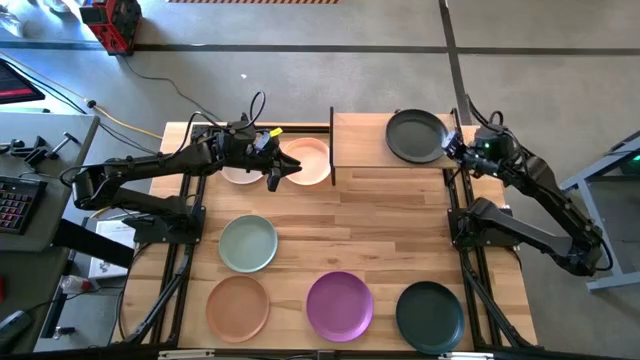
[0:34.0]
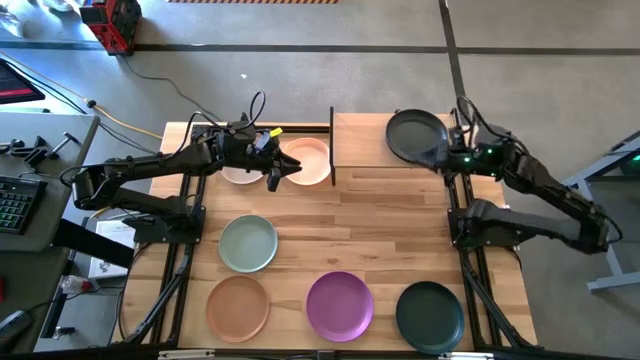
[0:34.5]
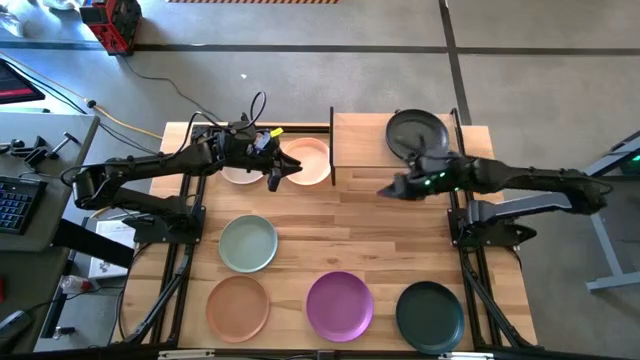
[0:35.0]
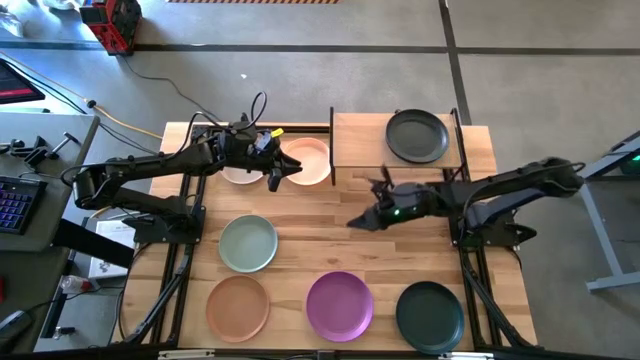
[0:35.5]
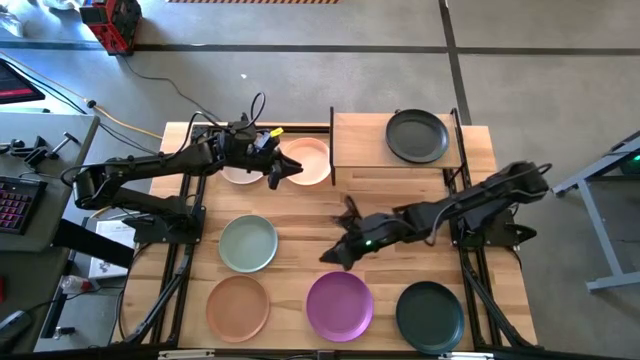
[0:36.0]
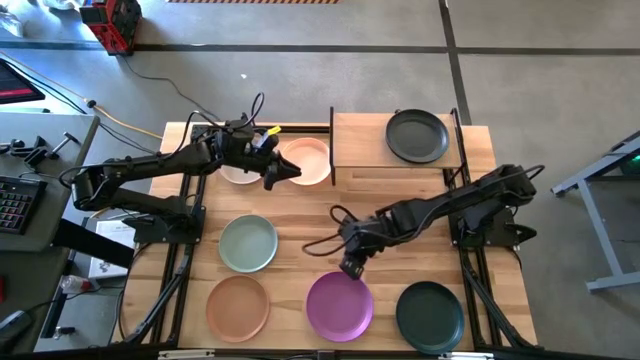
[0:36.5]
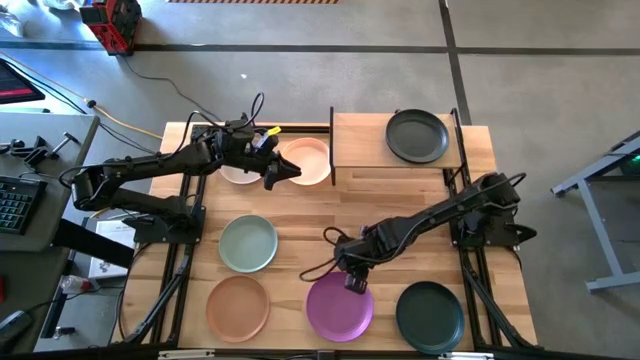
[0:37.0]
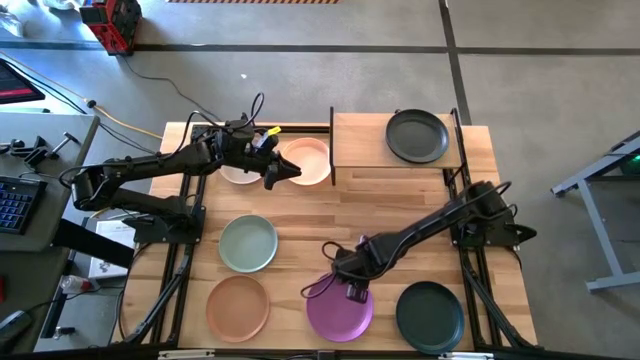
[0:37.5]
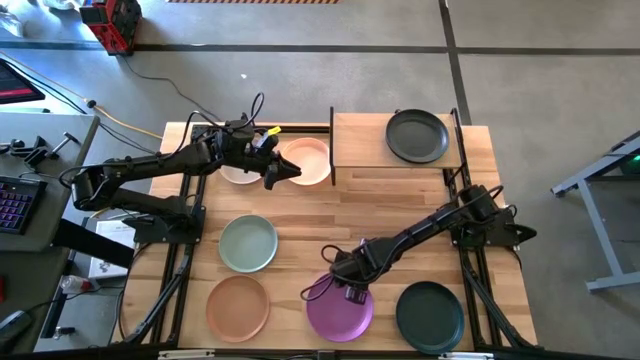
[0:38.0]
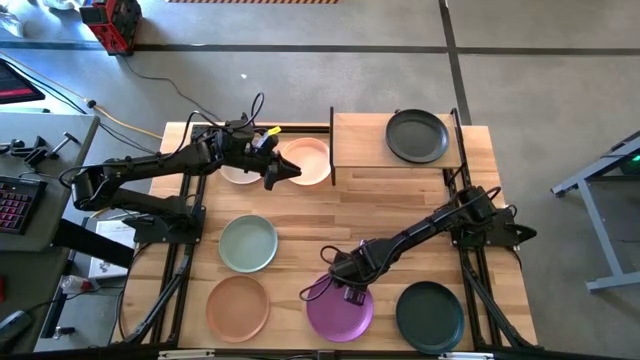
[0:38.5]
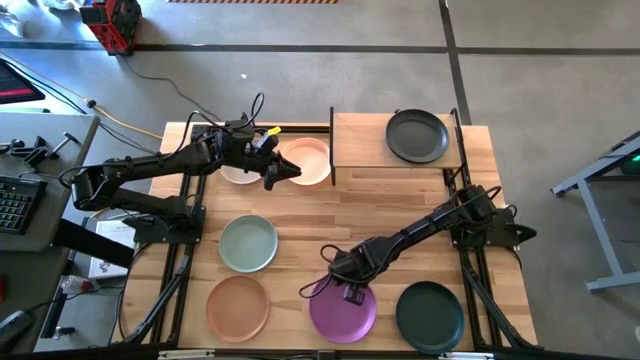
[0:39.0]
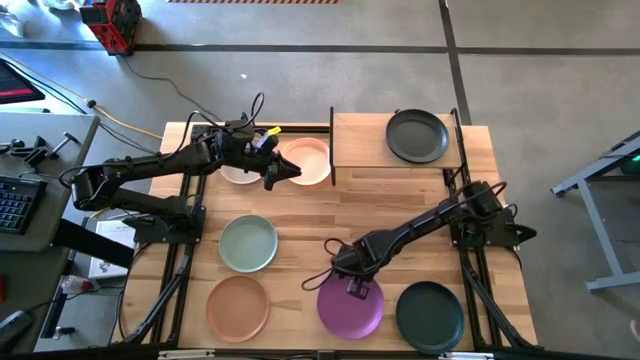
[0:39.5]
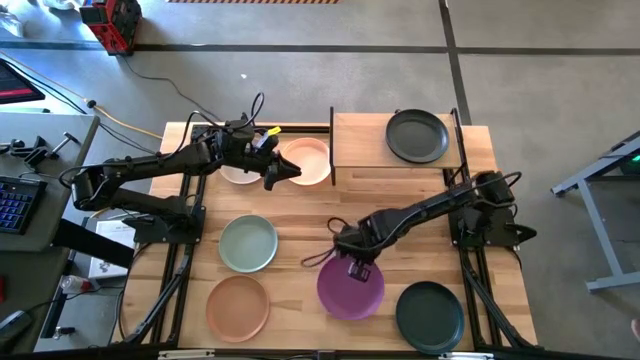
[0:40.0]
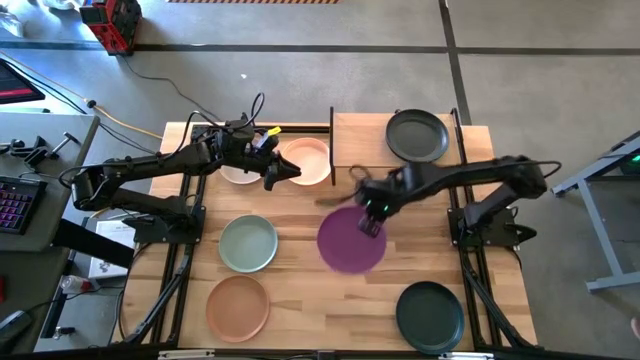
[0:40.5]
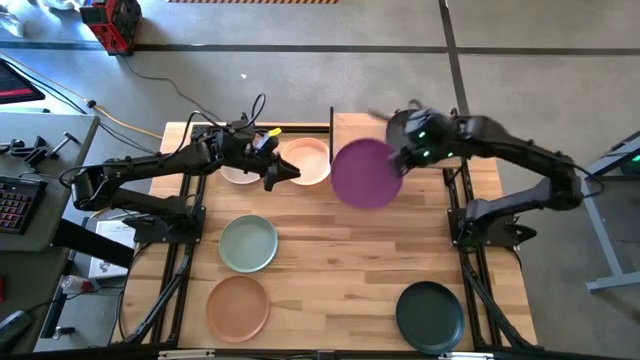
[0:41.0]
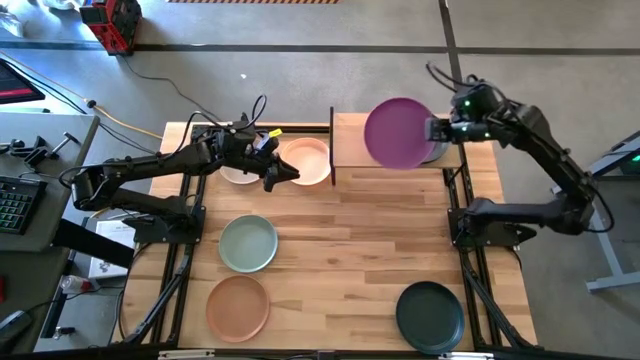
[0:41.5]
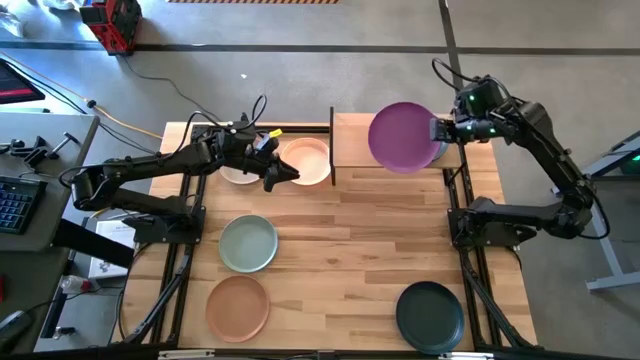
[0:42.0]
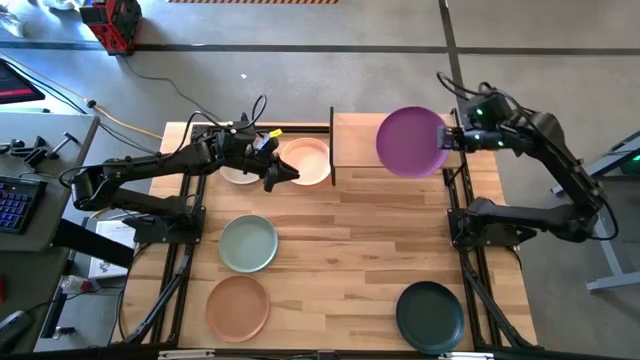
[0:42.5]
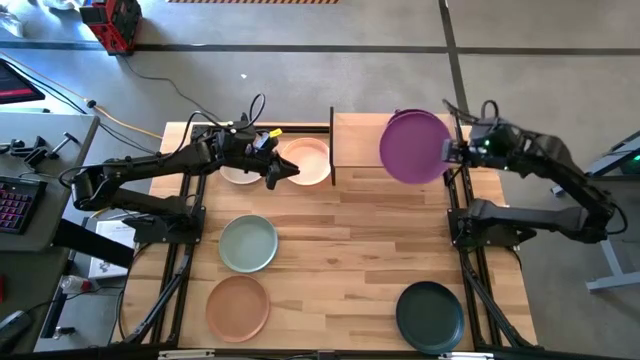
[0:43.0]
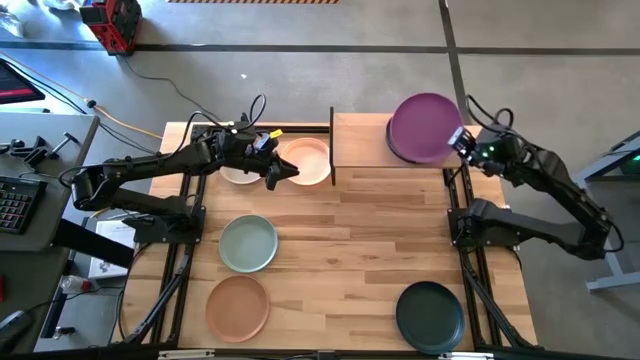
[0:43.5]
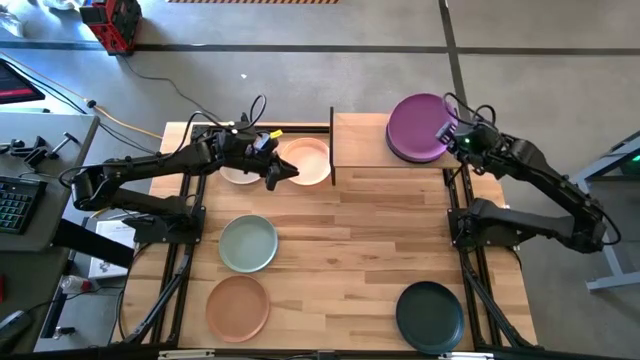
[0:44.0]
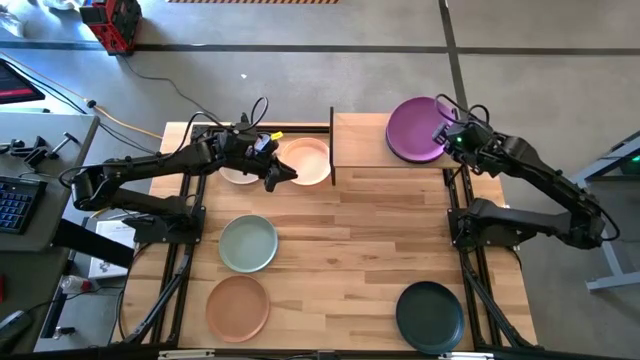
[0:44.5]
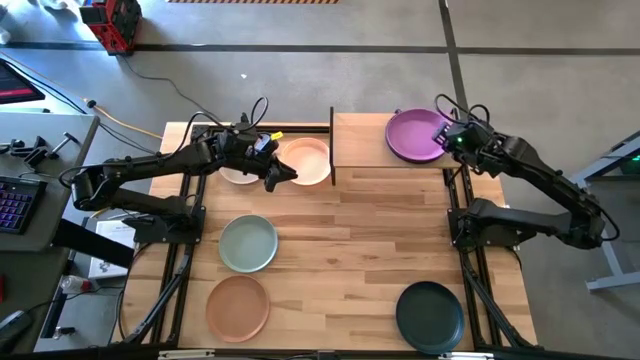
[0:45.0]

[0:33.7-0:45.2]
Task: Place and stack plates onto a shelf
Stack the violet plate on top of the black plate on the shelf

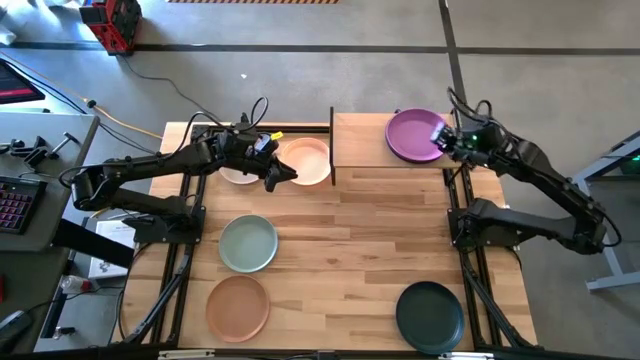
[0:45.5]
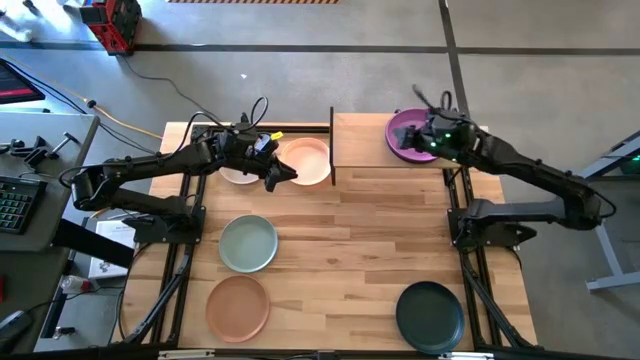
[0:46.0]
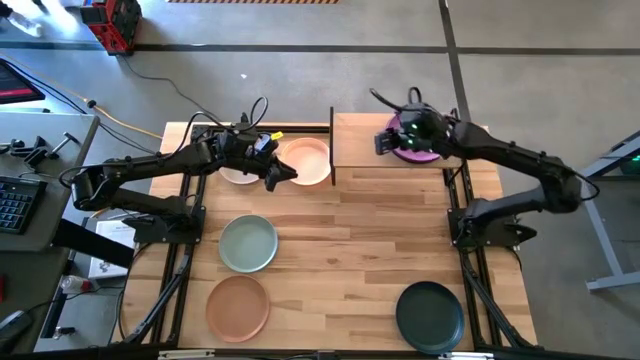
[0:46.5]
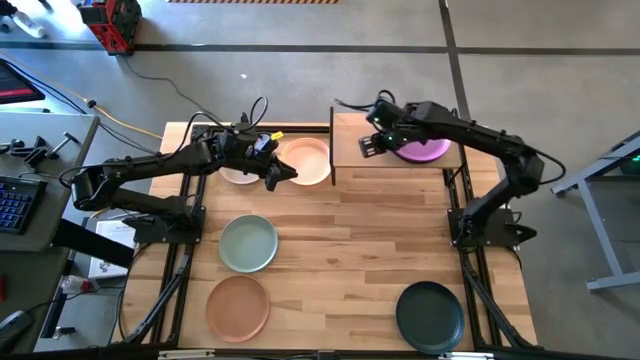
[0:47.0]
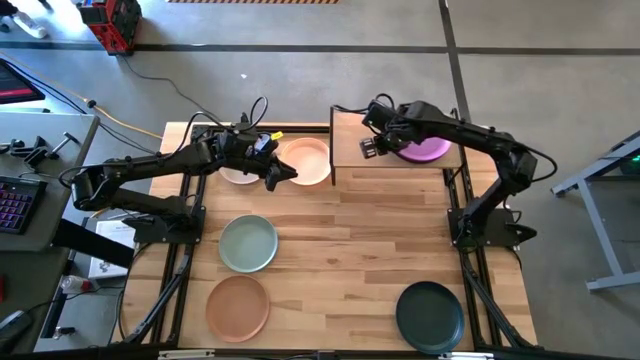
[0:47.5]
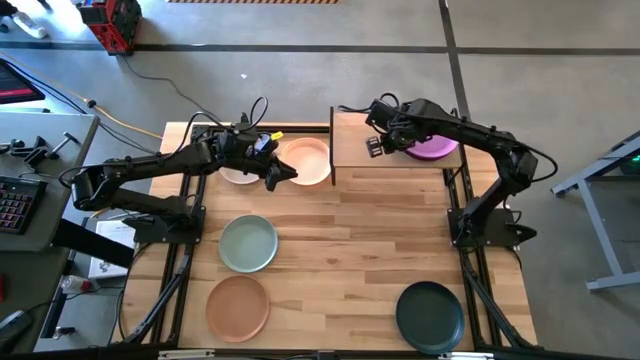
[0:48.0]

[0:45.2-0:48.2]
Adjust the stacked plates on the shelf

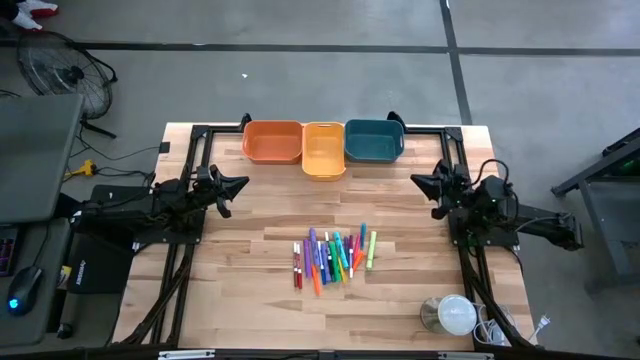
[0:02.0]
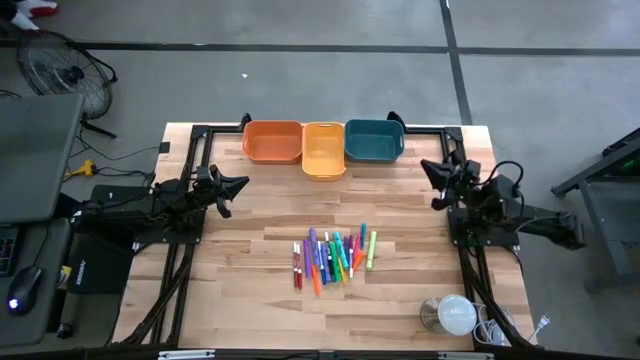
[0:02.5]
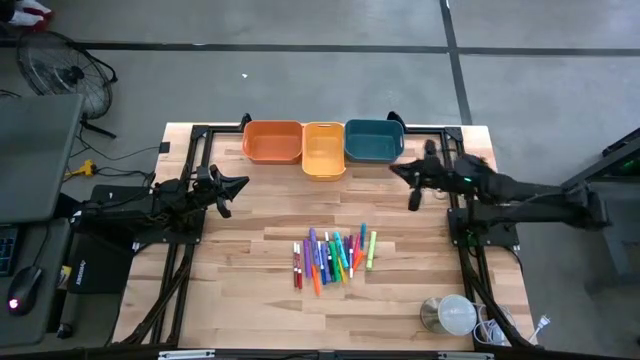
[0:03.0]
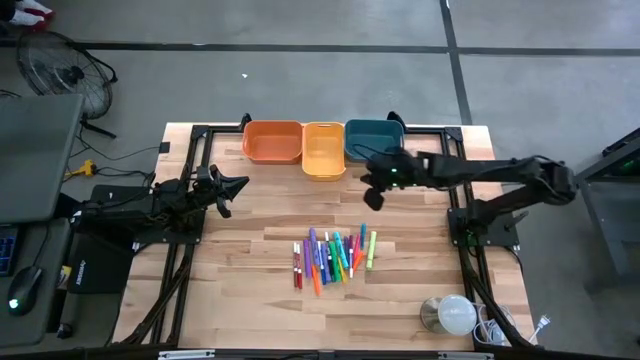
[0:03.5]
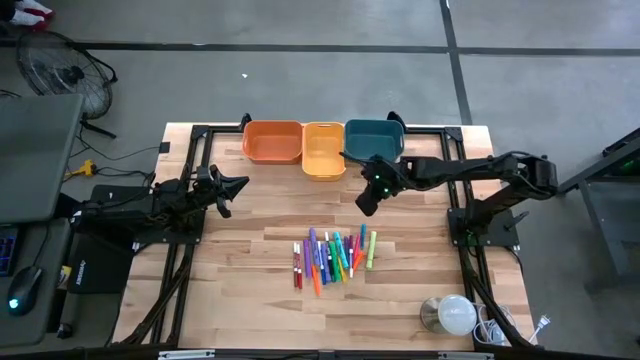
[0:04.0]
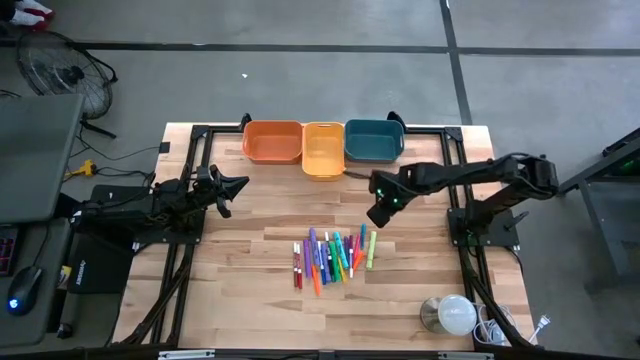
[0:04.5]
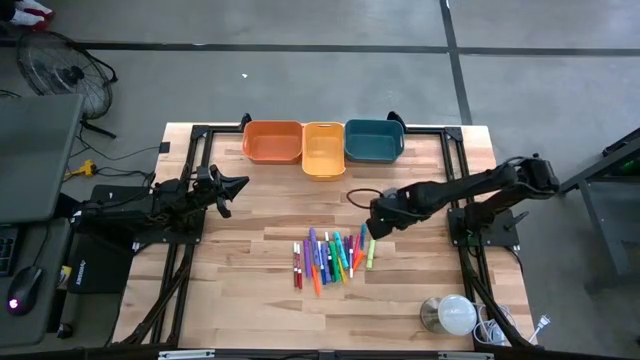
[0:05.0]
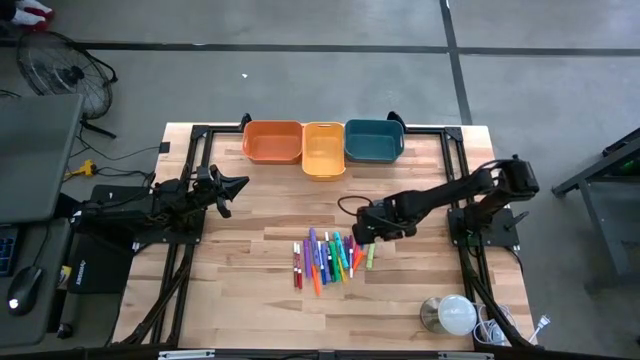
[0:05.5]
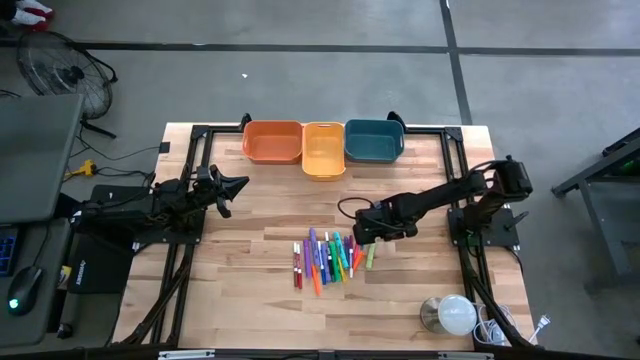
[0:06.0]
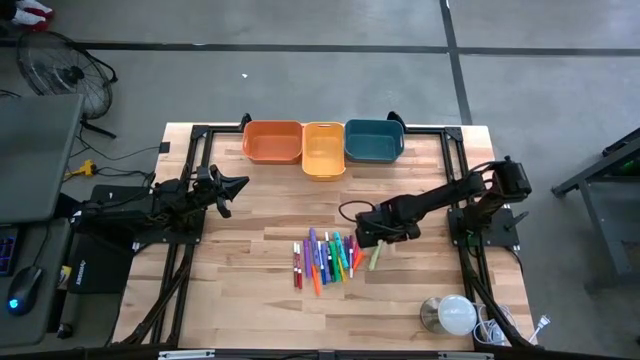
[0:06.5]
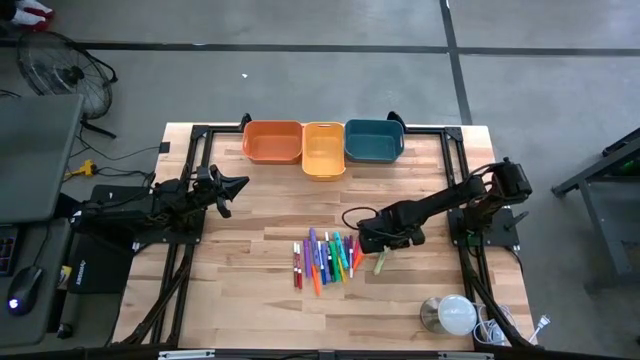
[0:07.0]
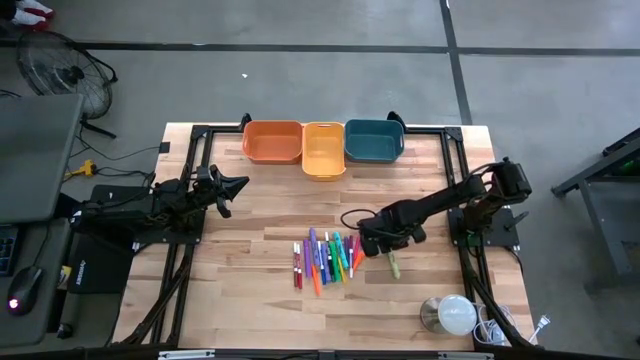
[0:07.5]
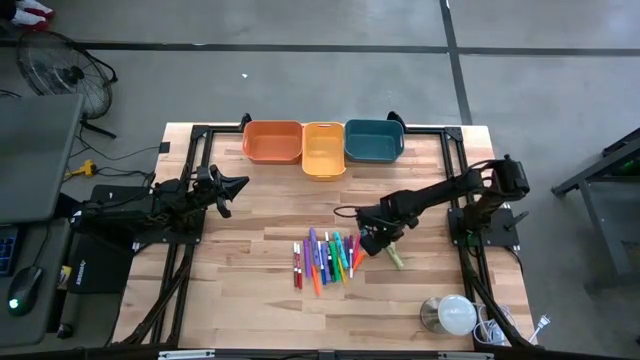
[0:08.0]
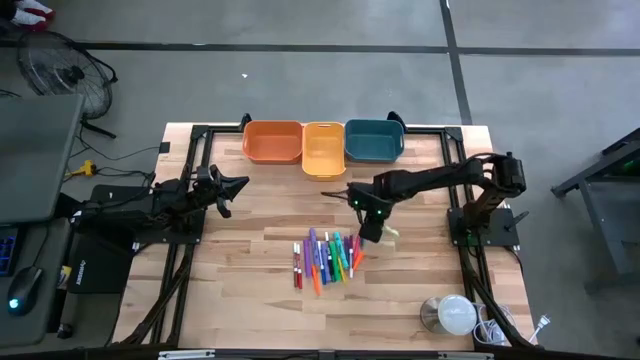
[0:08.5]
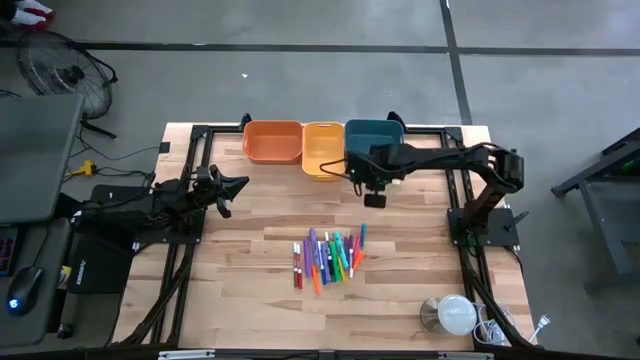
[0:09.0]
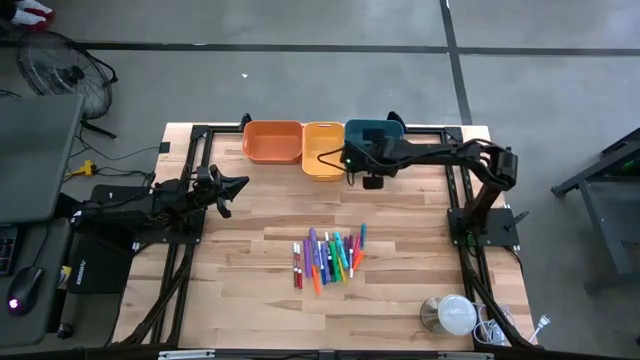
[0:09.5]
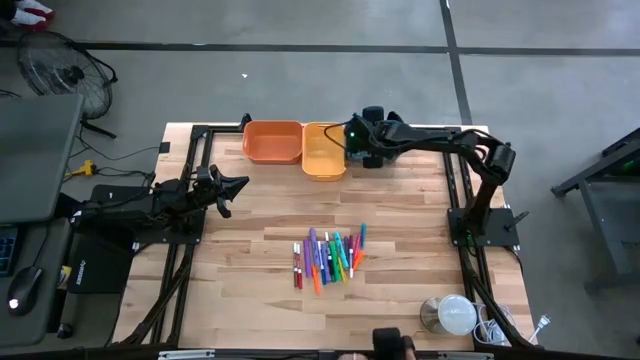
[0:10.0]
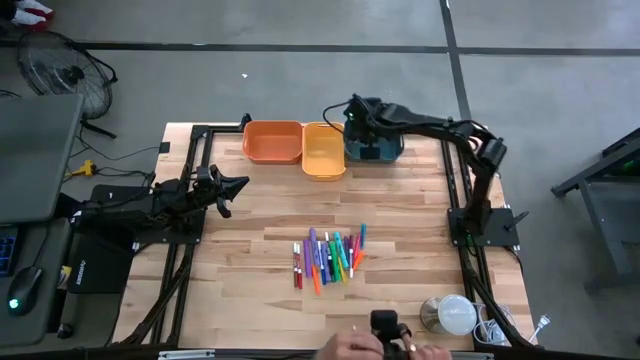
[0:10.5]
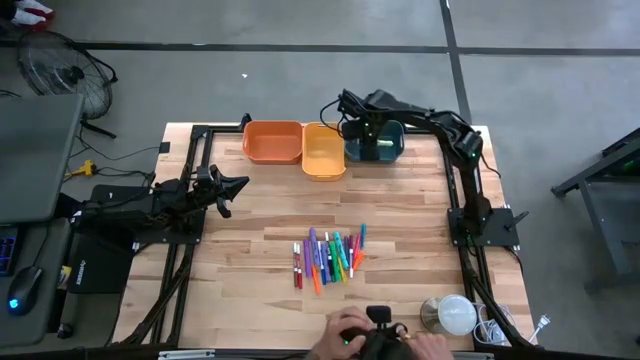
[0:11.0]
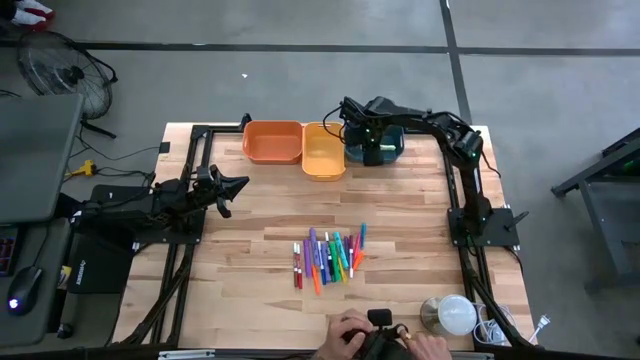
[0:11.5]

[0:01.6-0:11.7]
Task: Pick & Place Markers
Put the light green highlighter into the blue bin
